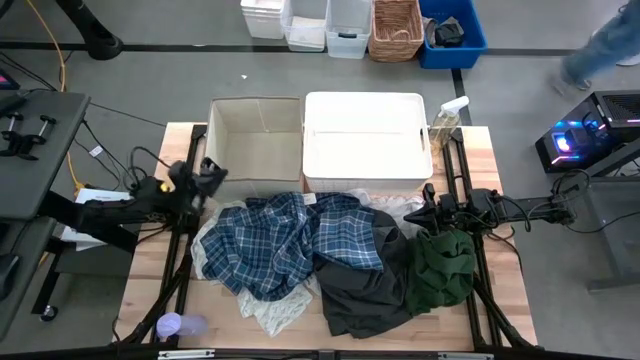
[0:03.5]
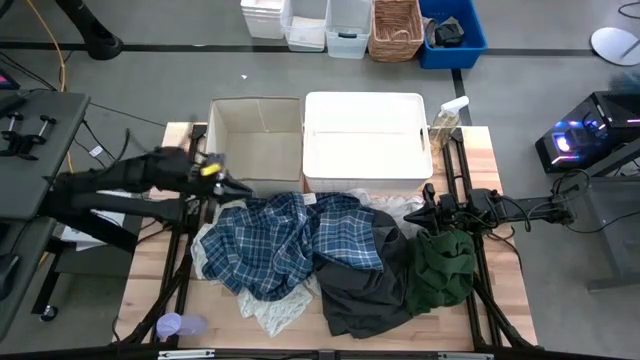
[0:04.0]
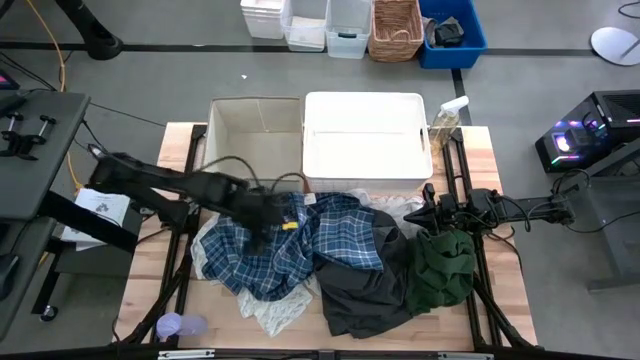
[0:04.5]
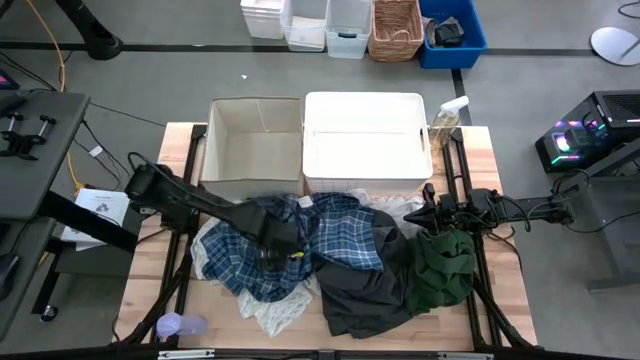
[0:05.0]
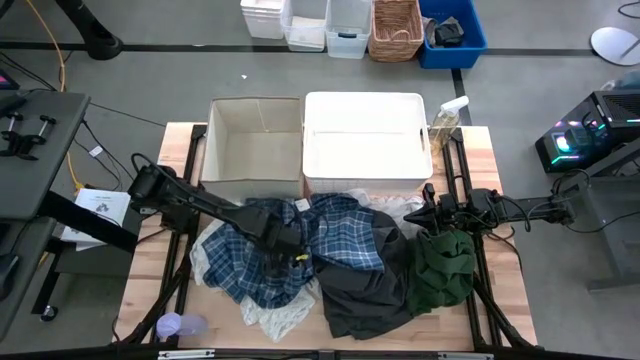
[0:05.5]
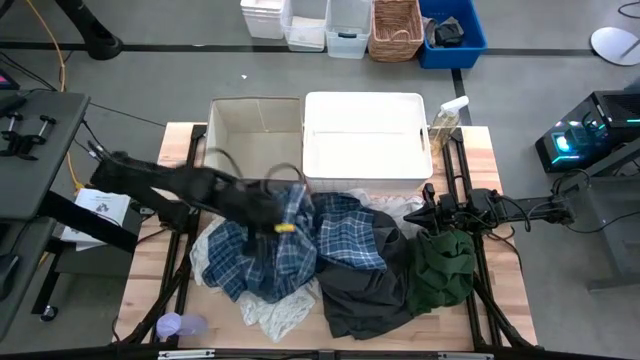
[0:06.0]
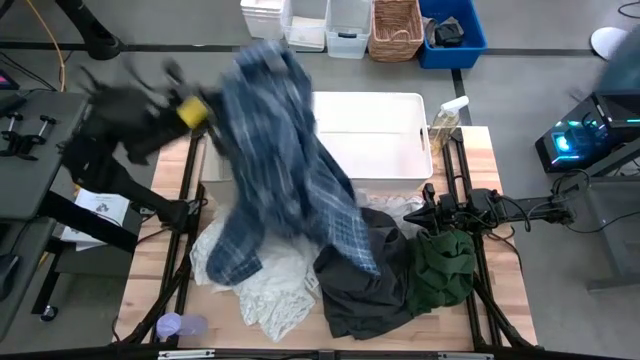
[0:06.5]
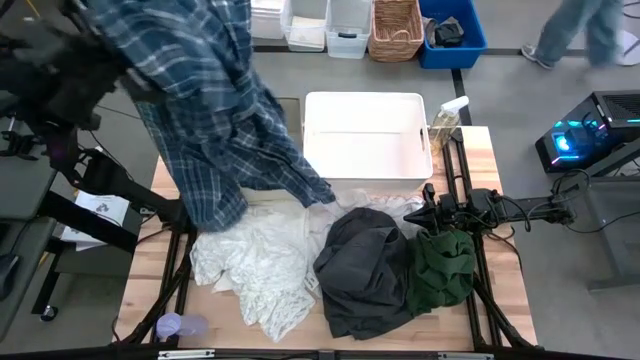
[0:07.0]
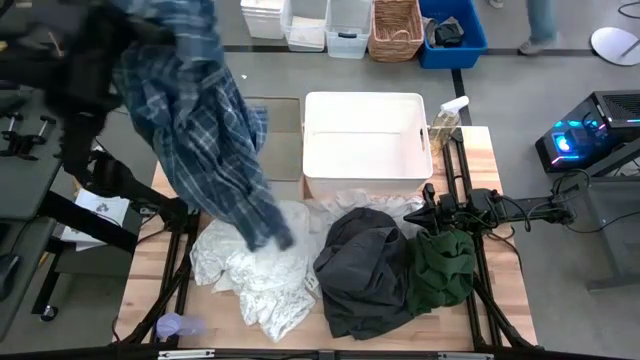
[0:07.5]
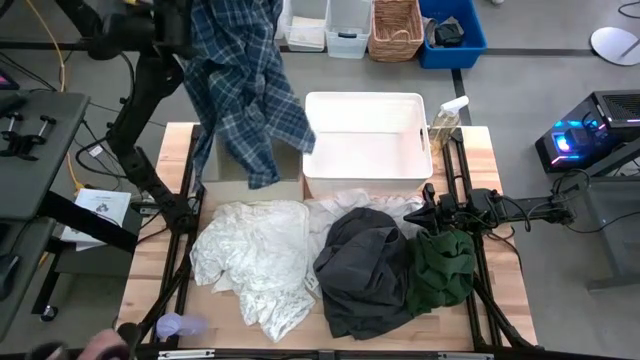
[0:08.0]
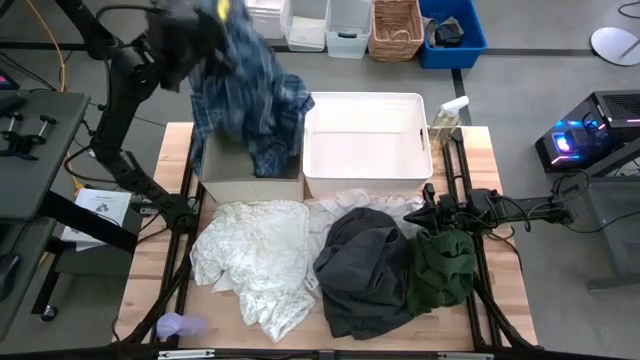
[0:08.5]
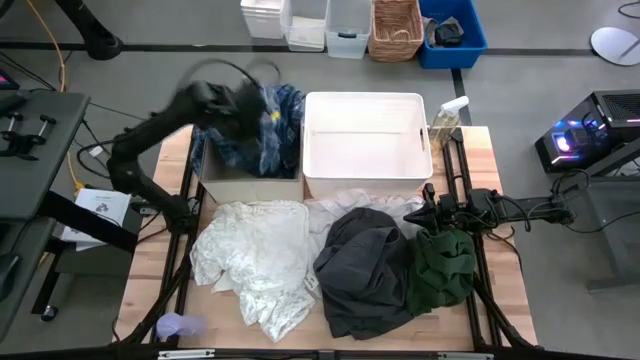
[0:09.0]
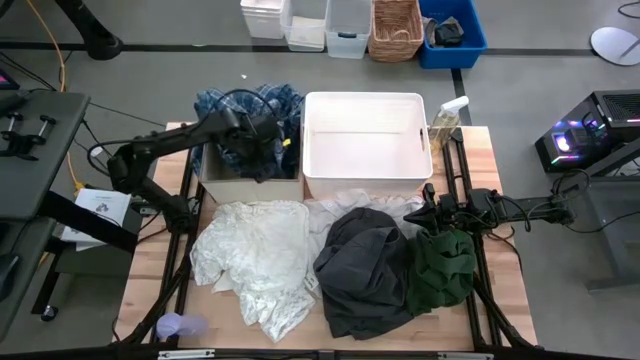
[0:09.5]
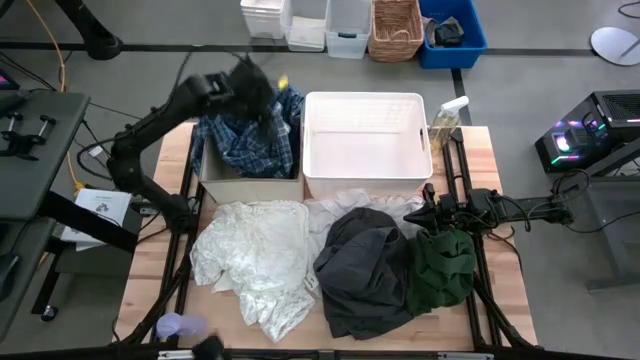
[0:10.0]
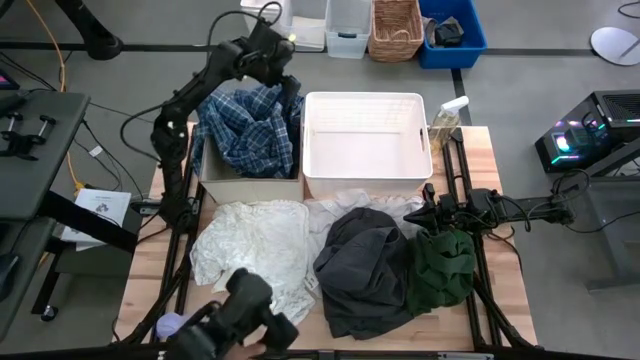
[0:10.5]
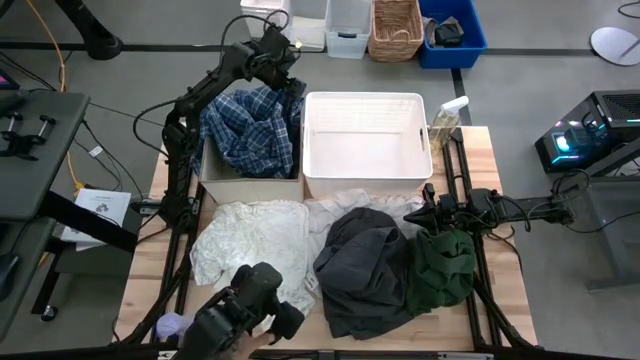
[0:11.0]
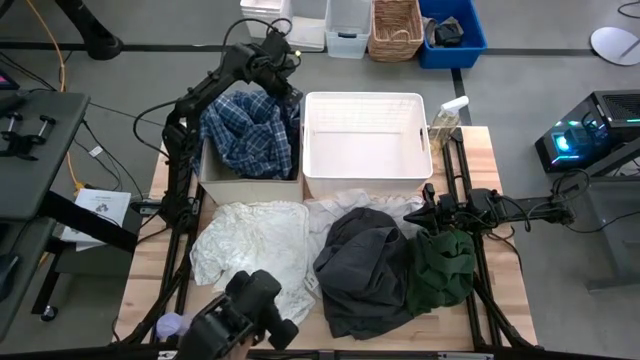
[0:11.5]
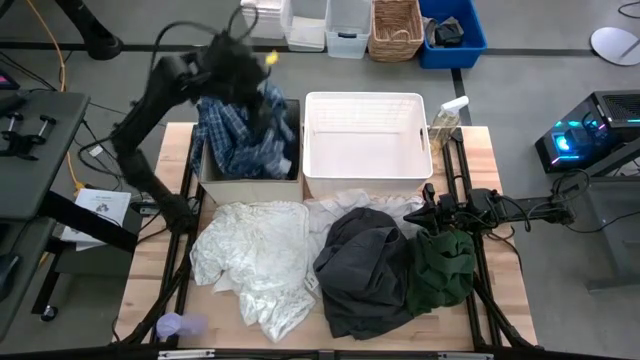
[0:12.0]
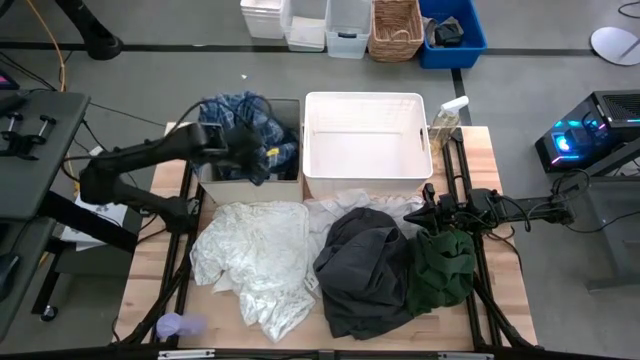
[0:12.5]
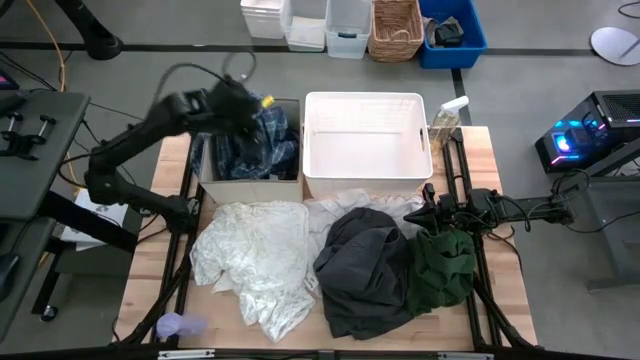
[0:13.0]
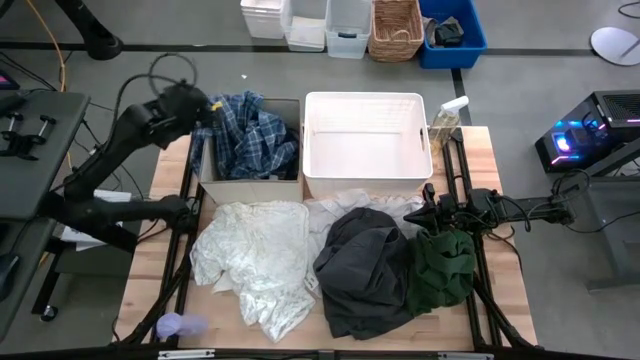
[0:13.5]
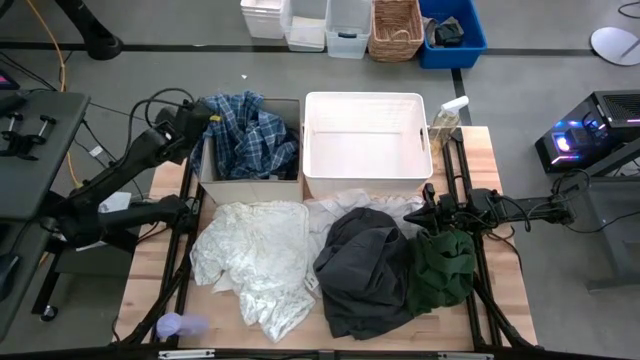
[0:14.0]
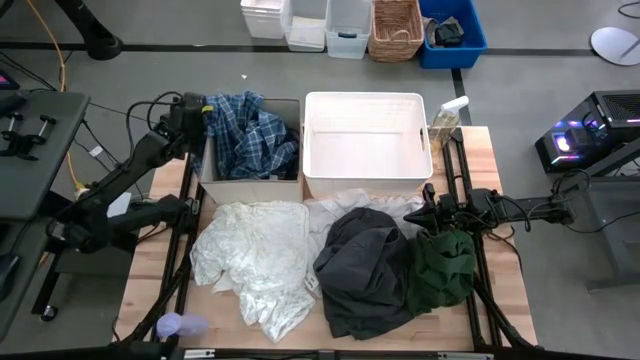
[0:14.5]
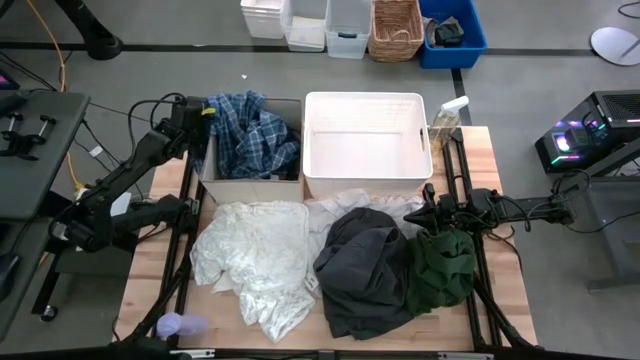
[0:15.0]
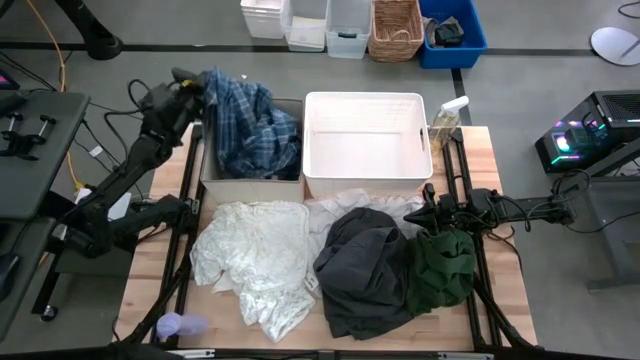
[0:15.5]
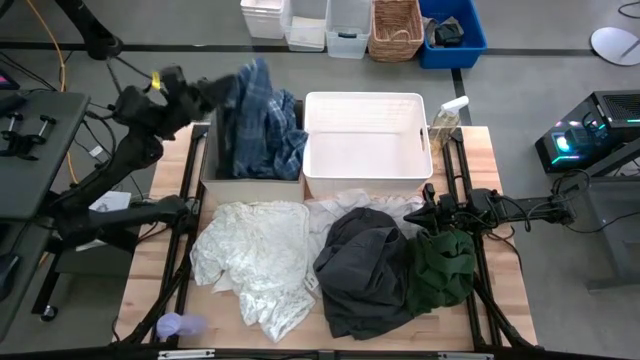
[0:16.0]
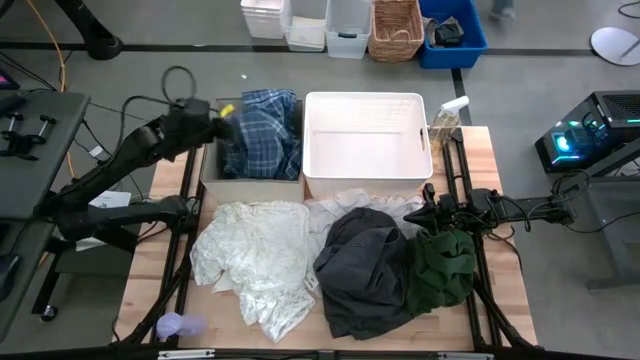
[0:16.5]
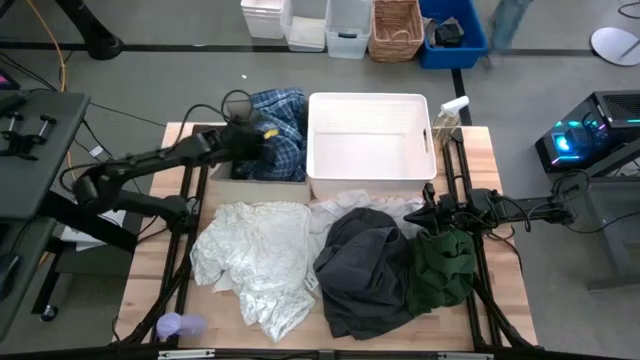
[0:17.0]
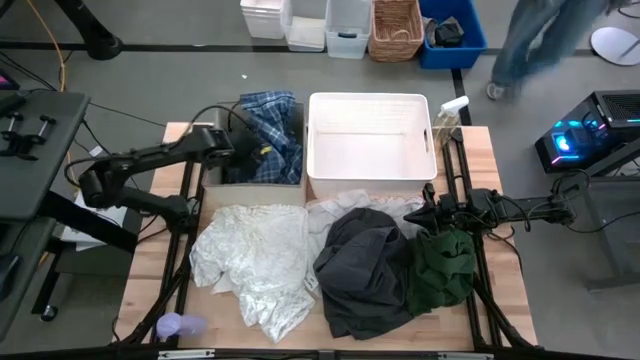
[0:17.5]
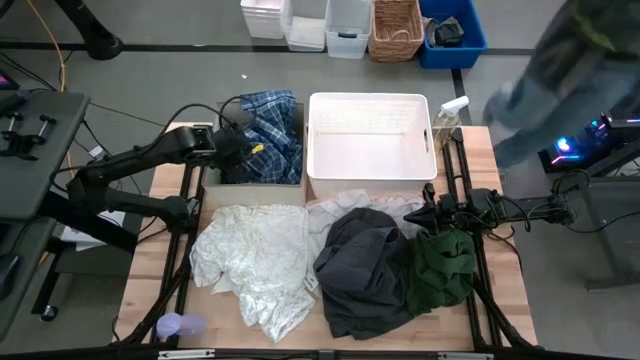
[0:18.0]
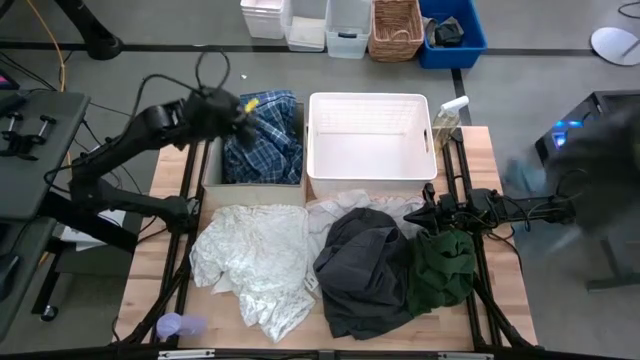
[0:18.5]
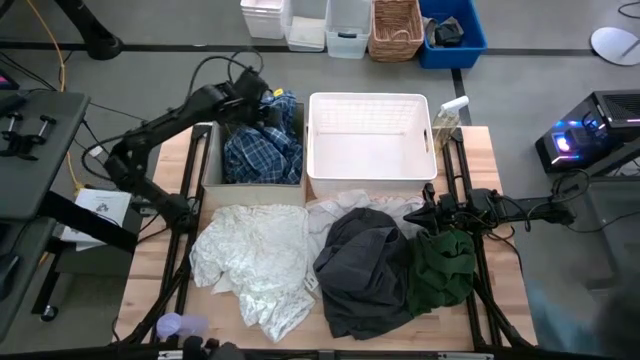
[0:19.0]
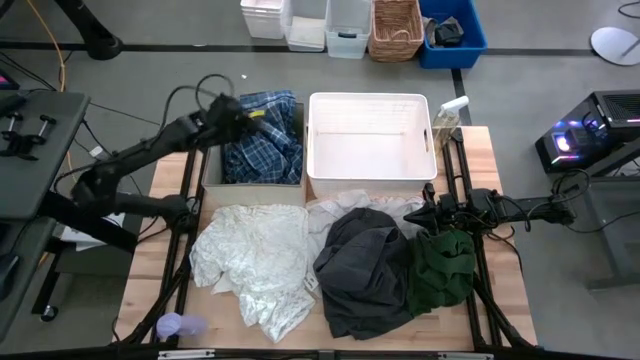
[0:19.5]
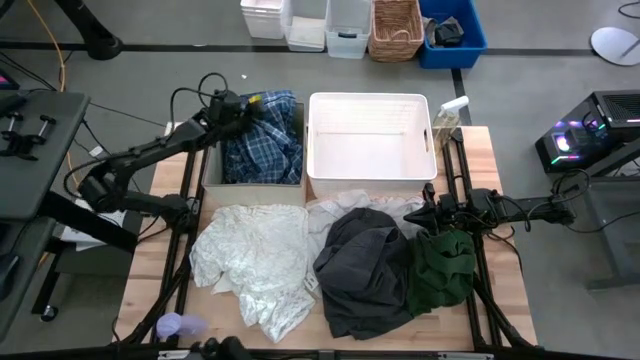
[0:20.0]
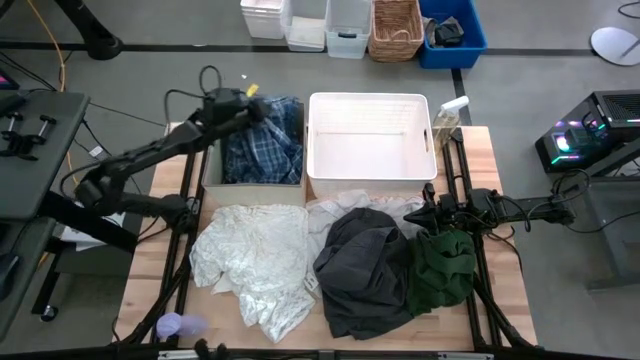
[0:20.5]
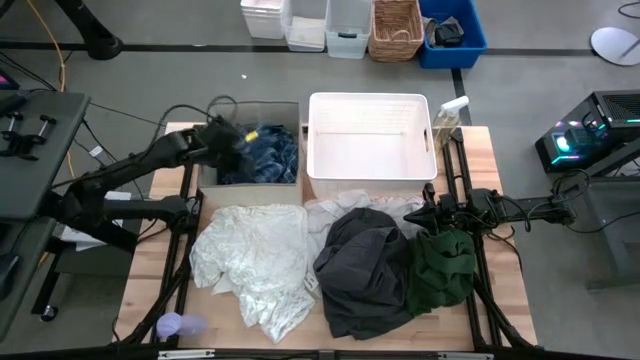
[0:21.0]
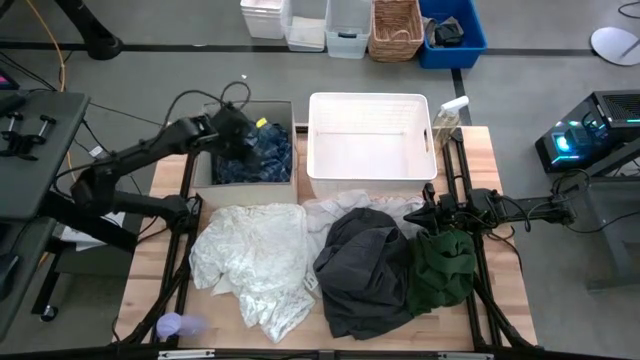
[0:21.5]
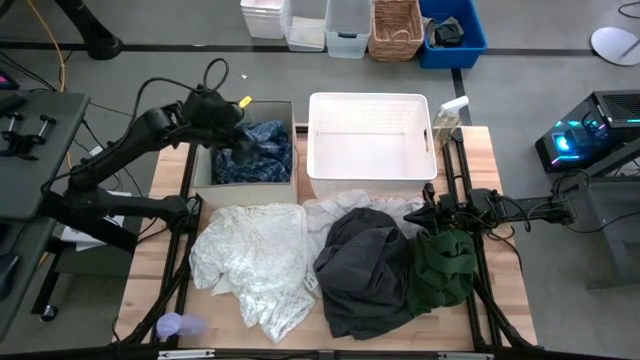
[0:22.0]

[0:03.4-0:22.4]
Task: Sort clothes
Put the blue polo shirt on the laundry organizer

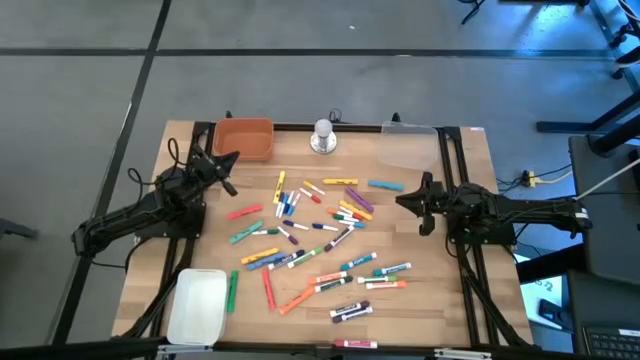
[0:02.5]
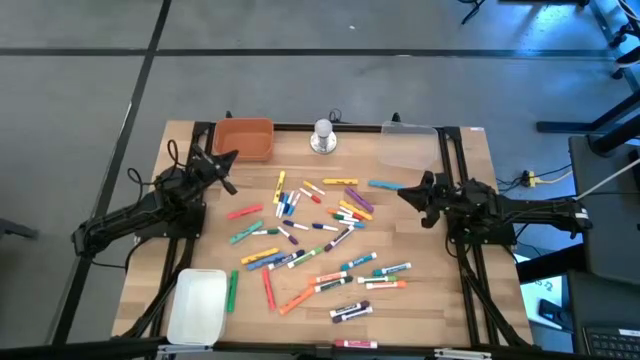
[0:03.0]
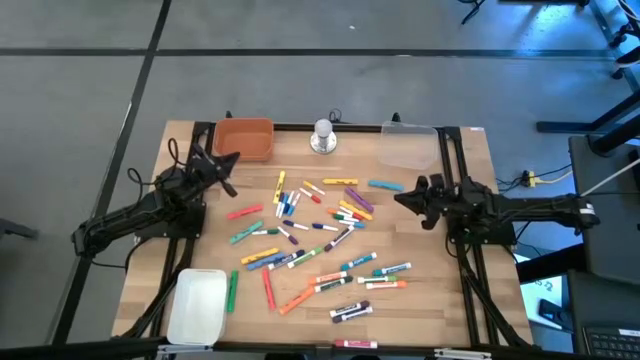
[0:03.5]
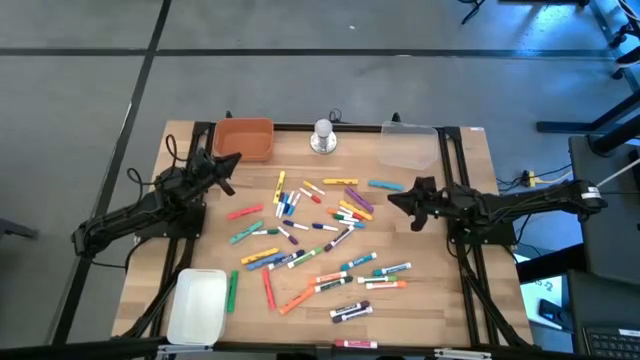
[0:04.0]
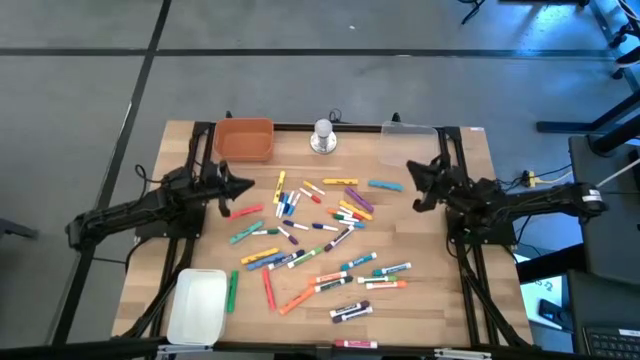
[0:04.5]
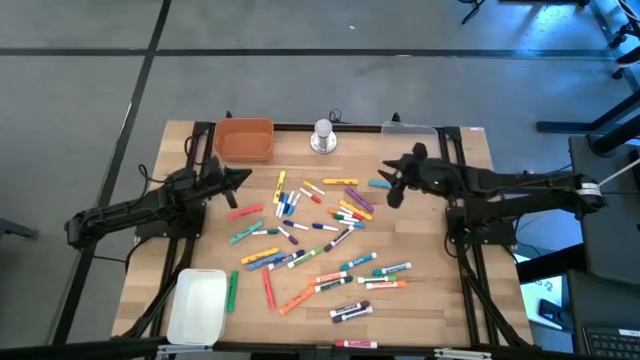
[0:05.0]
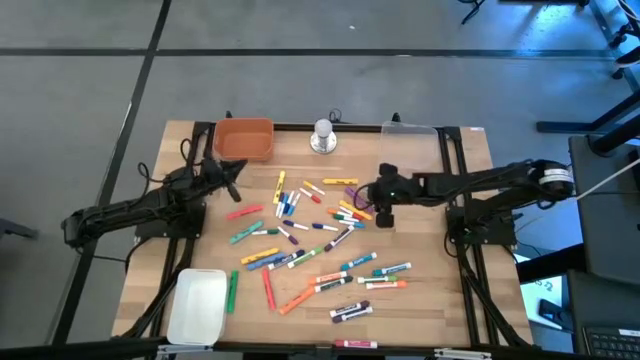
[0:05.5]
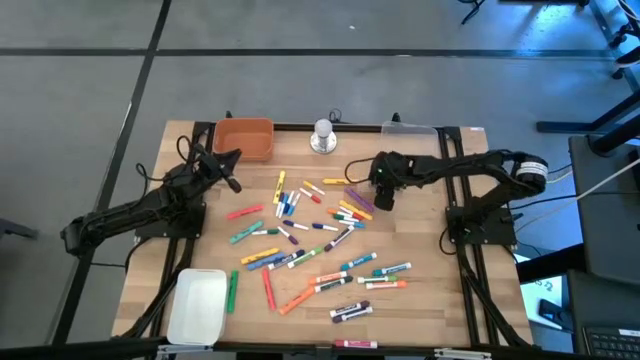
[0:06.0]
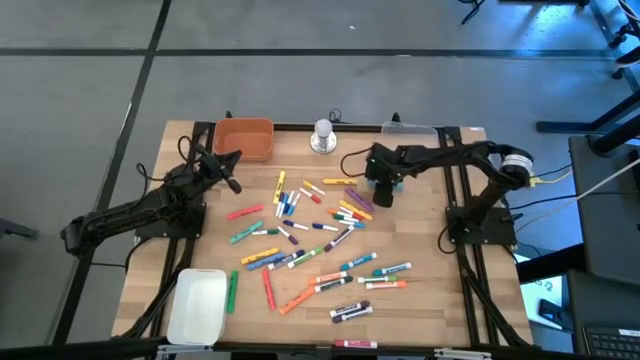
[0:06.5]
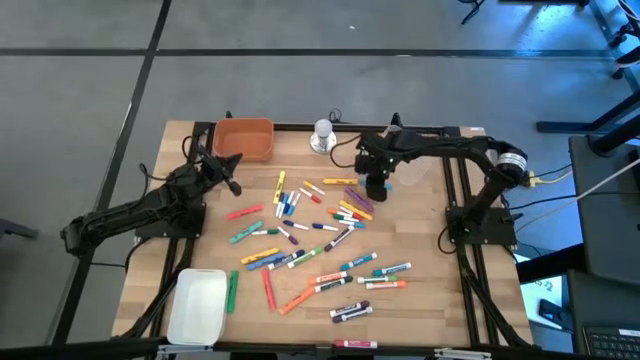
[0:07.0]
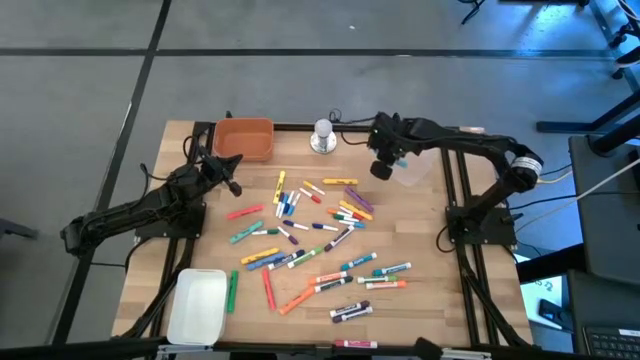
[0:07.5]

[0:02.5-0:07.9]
Task: Pick & Place Markers
Put the large blue highlighter pen into the transparent bin
